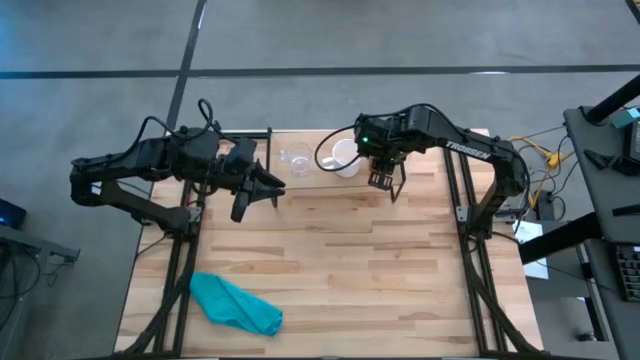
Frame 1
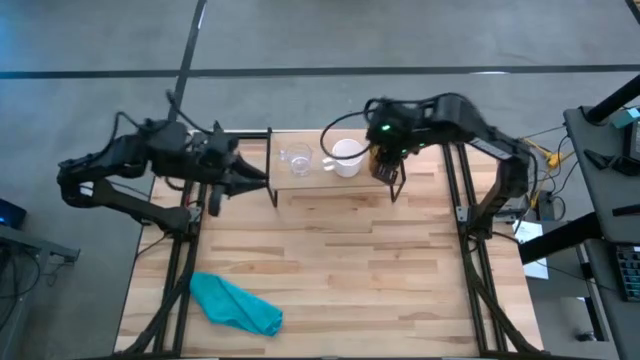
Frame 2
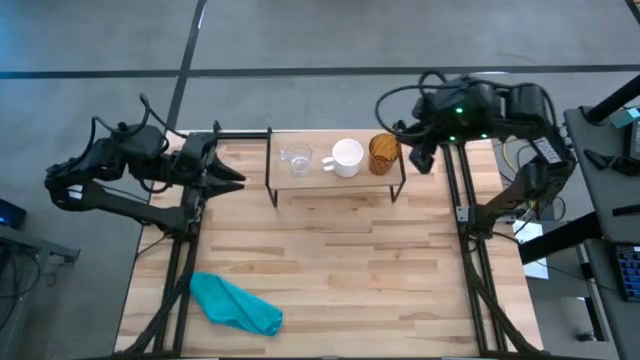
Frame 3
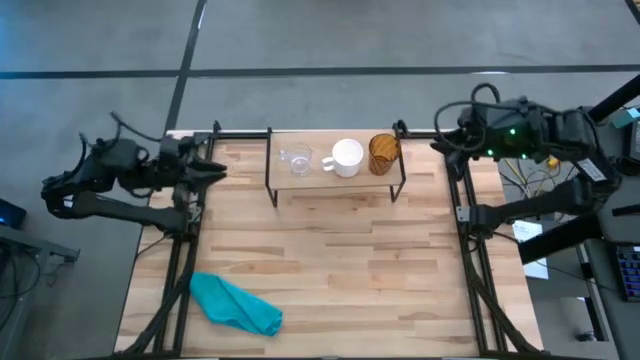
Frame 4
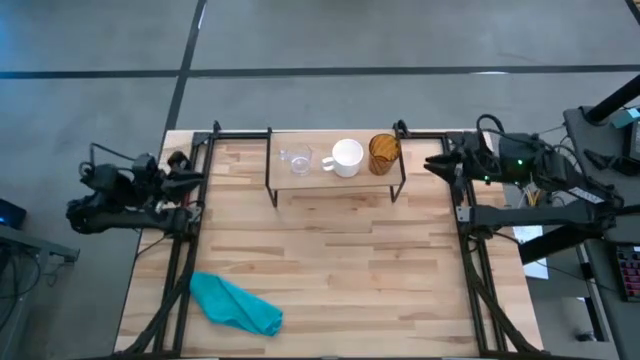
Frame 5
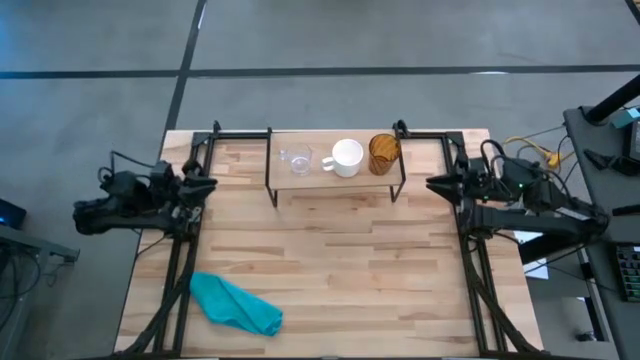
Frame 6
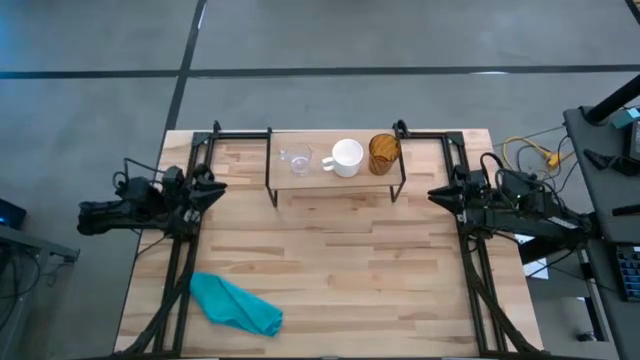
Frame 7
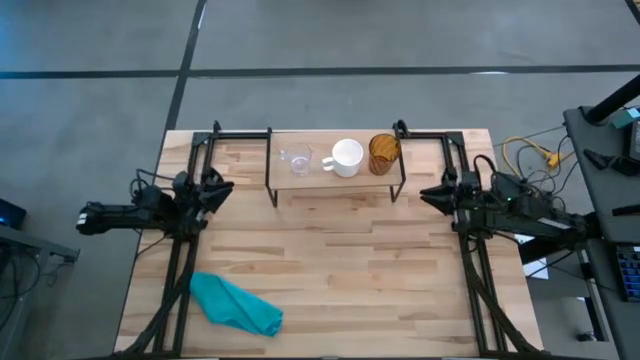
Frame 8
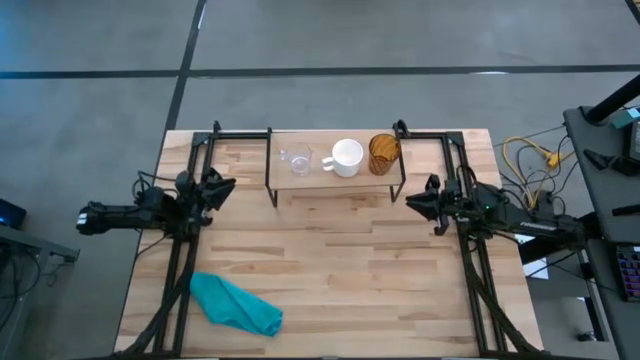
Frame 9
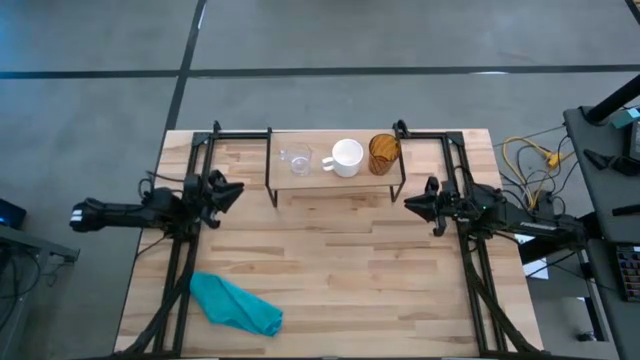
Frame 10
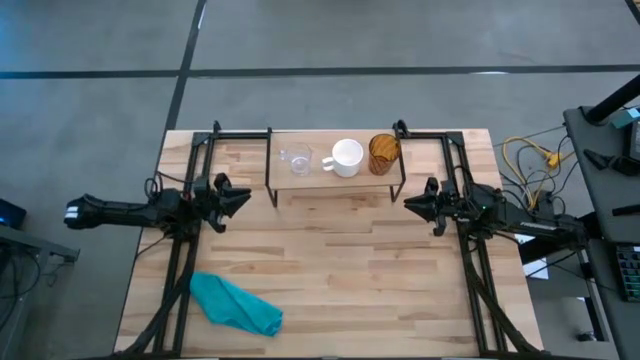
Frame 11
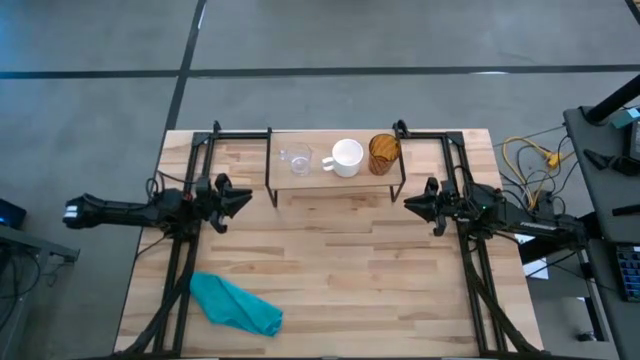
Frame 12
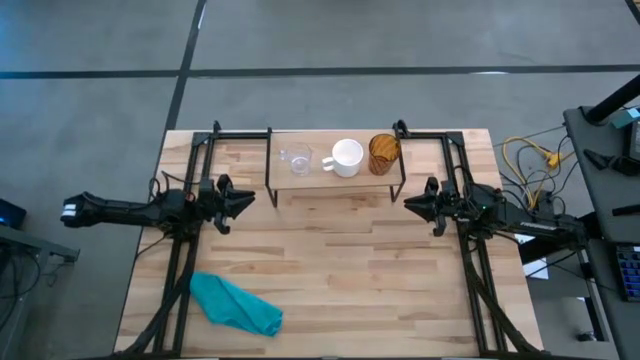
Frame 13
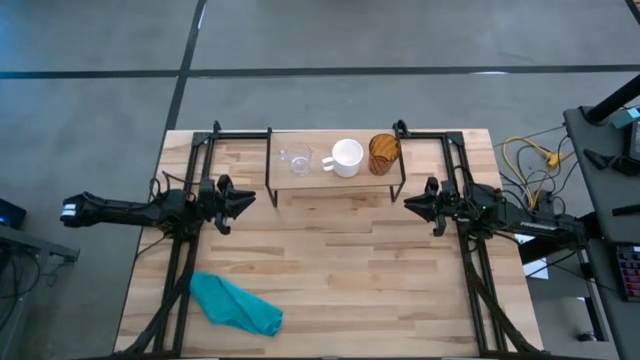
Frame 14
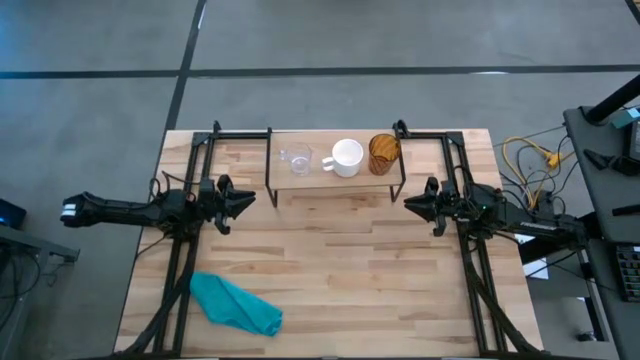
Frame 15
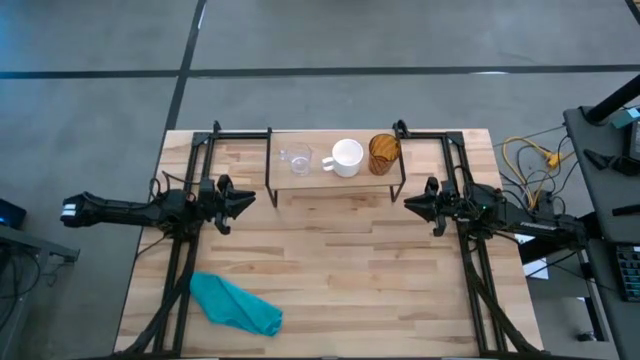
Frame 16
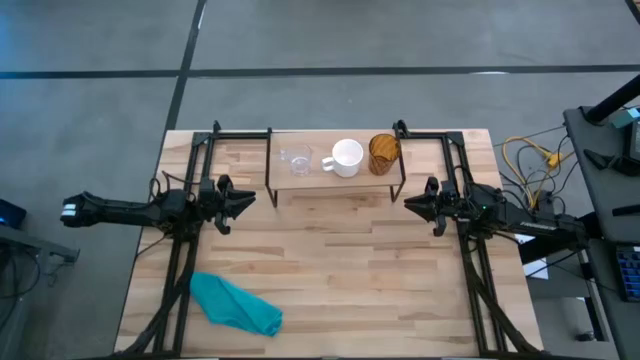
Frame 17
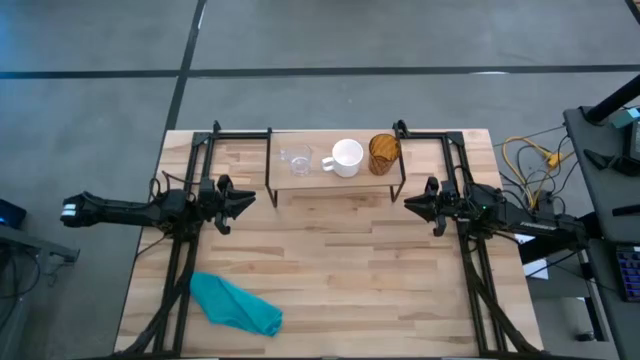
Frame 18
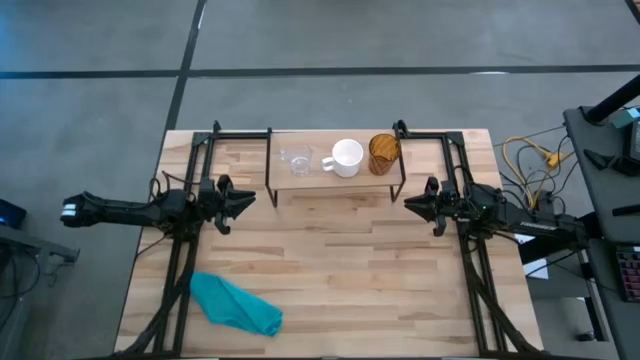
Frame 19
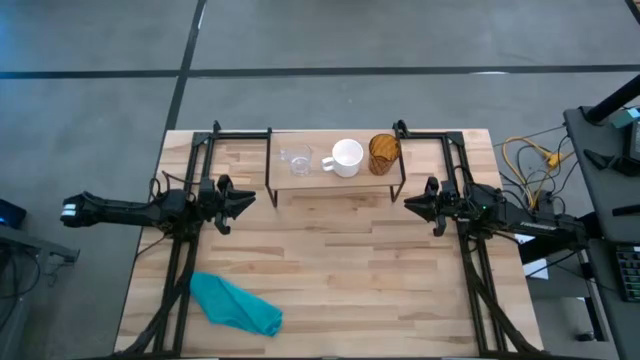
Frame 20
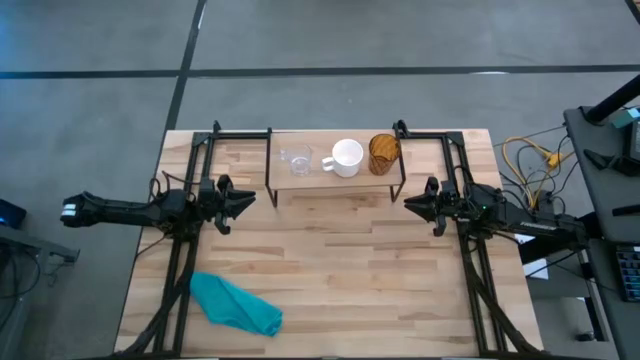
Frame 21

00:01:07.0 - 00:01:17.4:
Task: Stack small to large cups/mugs on shelf
Return to Home Position

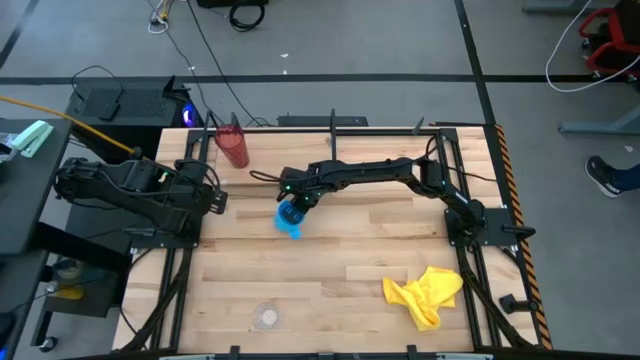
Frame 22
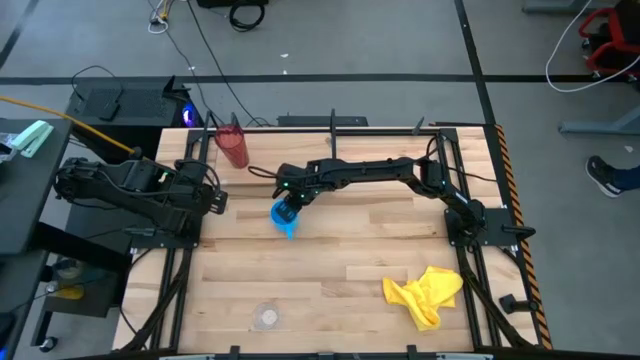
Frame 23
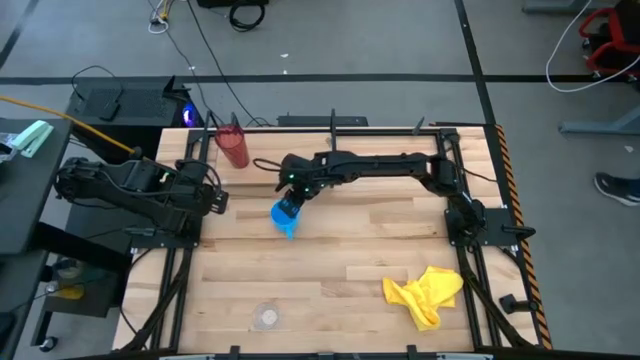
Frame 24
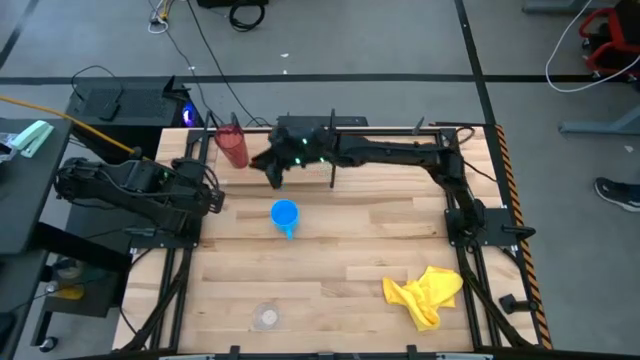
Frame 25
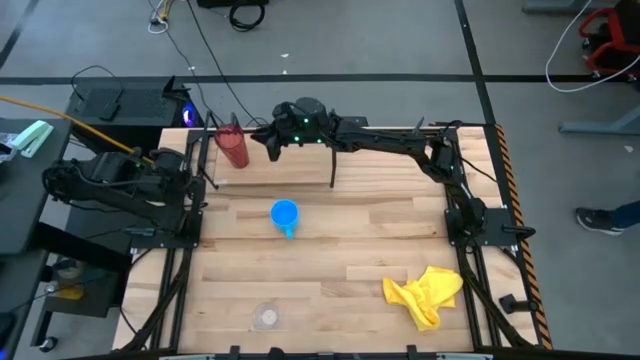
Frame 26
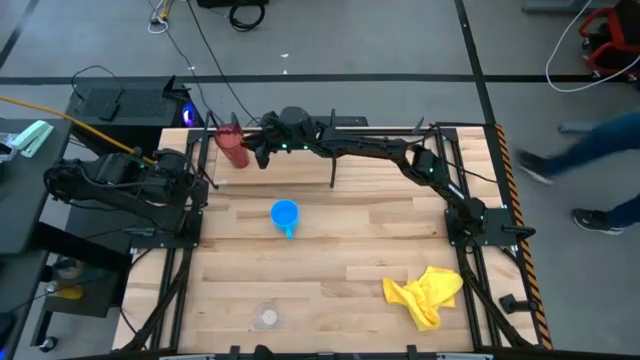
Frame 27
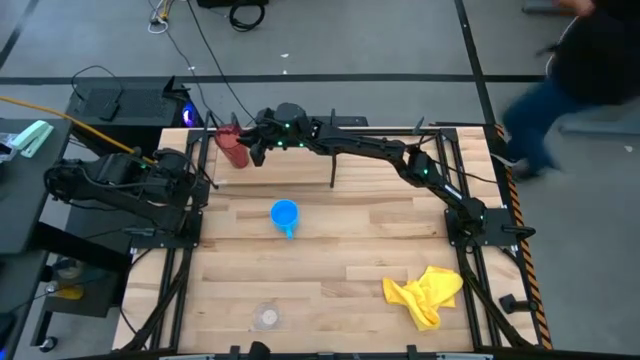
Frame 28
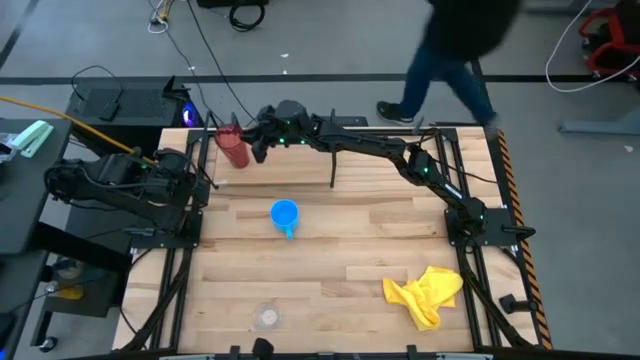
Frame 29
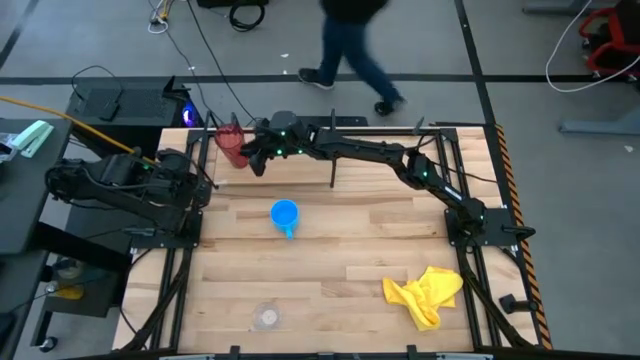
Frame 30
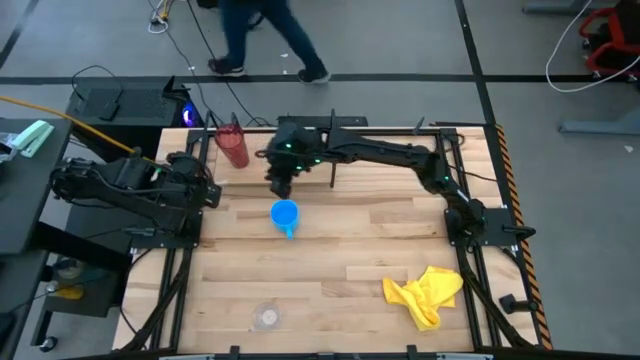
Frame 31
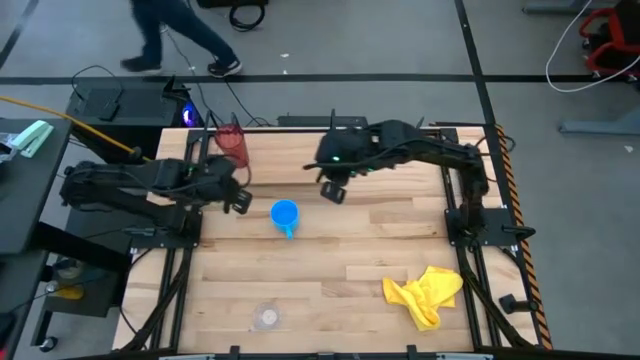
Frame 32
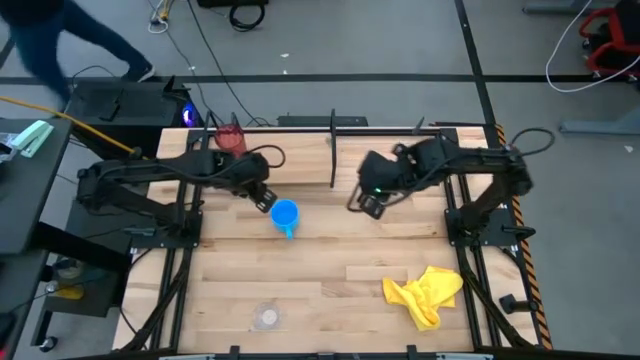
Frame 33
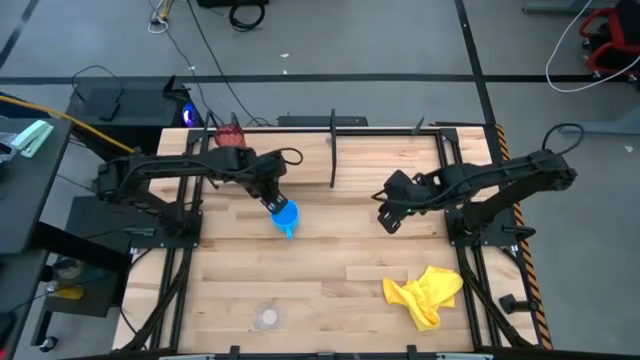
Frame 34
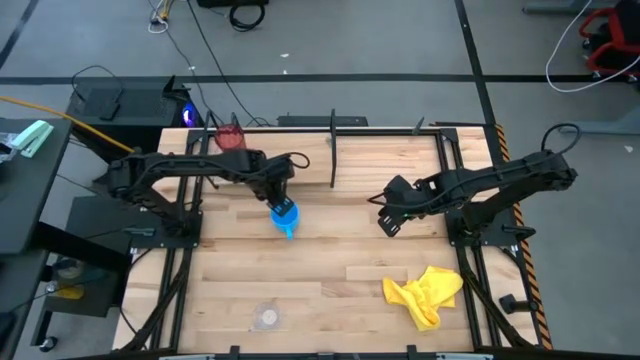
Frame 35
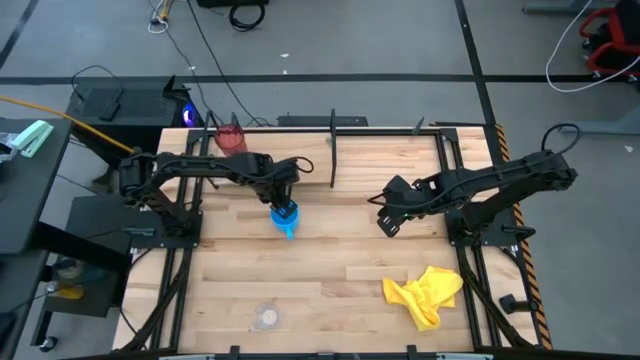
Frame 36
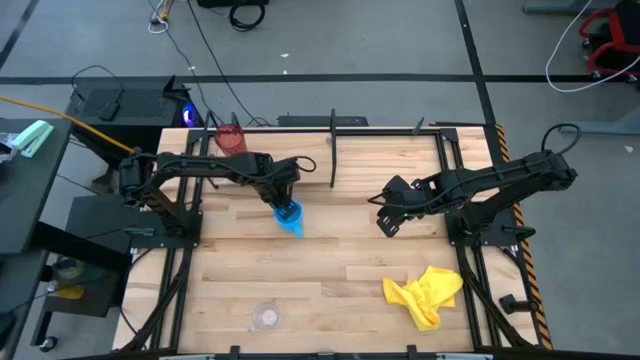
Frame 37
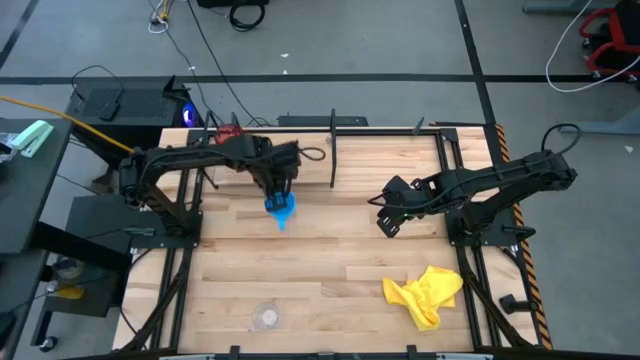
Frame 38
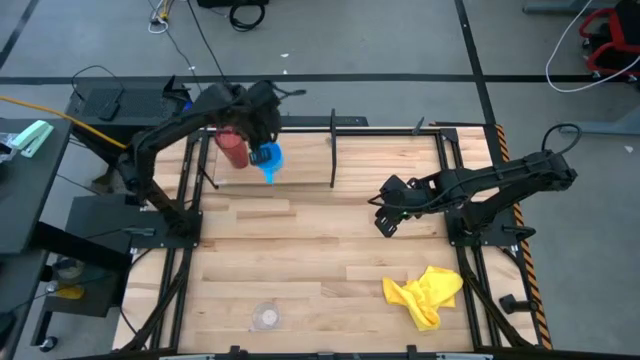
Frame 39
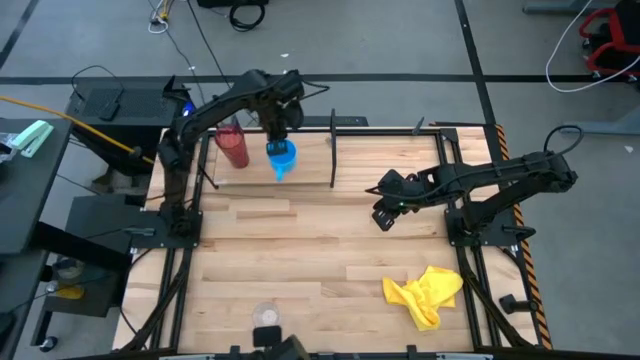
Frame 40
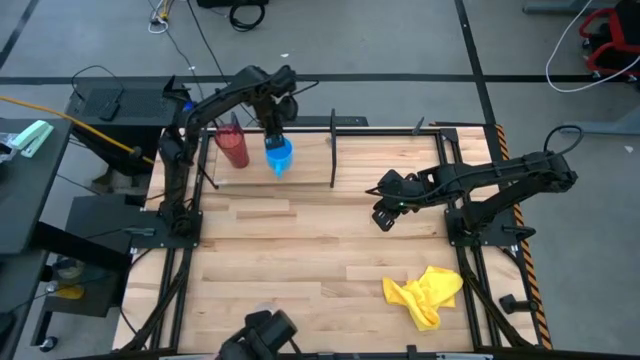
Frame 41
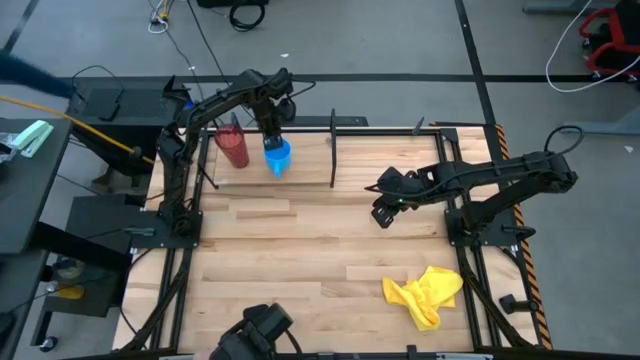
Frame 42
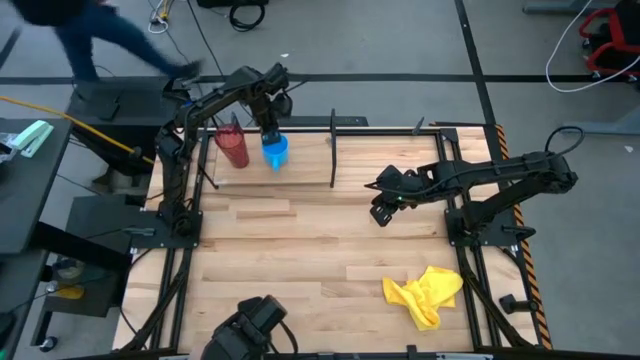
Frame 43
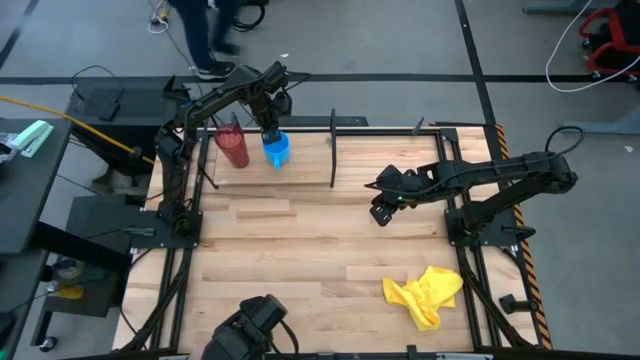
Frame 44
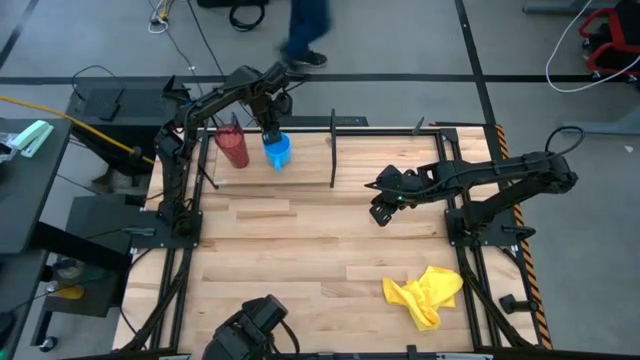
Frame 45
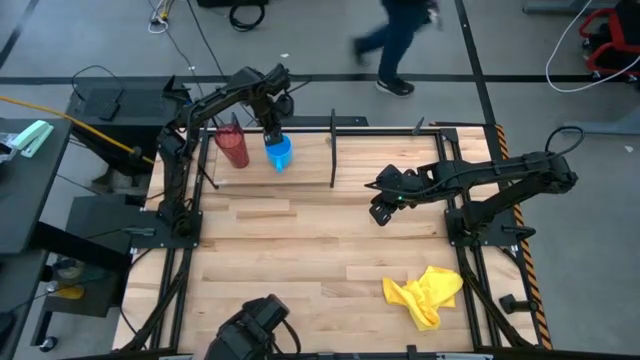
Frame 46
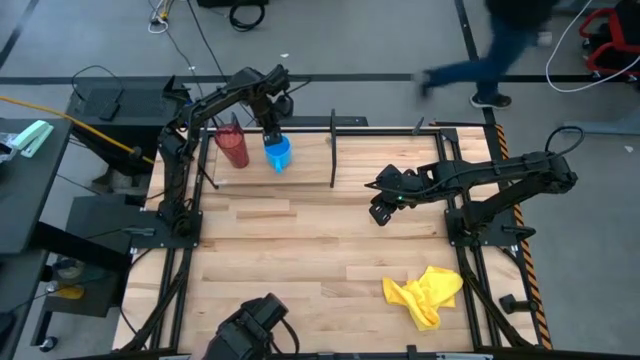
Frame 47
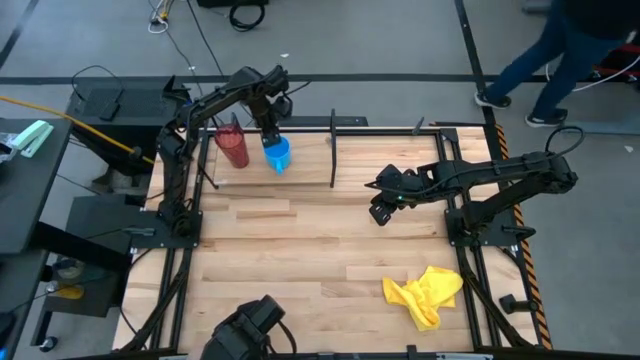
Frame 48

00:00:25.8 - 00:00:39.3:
Task: Stack small to large cups/mugs on shelf
Put the blue mug on the shelf
